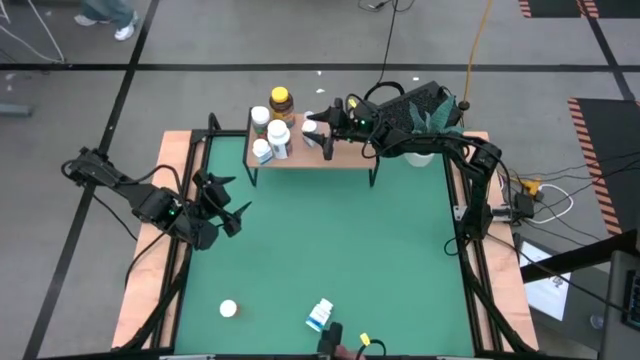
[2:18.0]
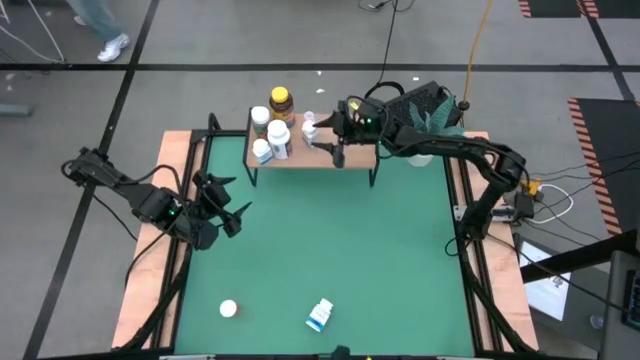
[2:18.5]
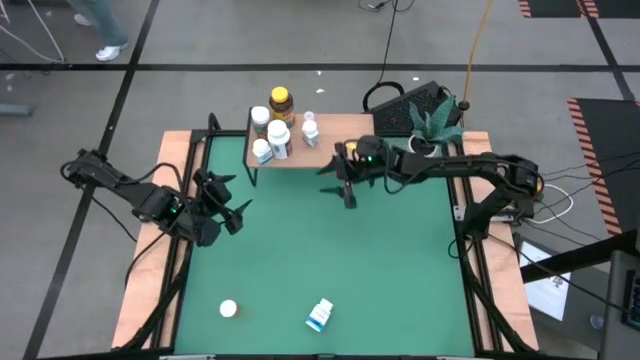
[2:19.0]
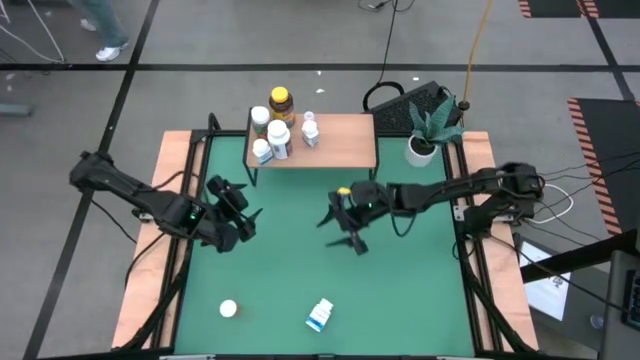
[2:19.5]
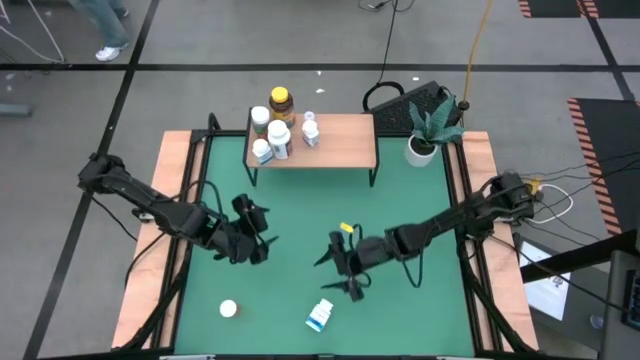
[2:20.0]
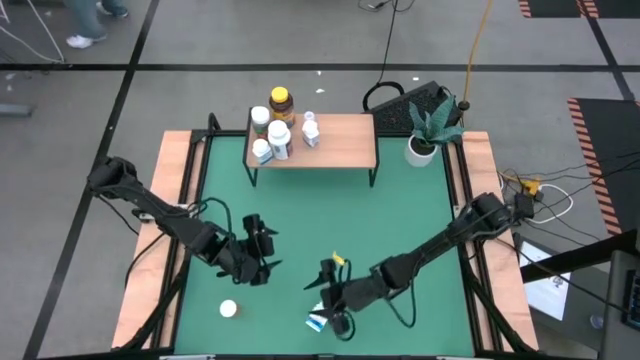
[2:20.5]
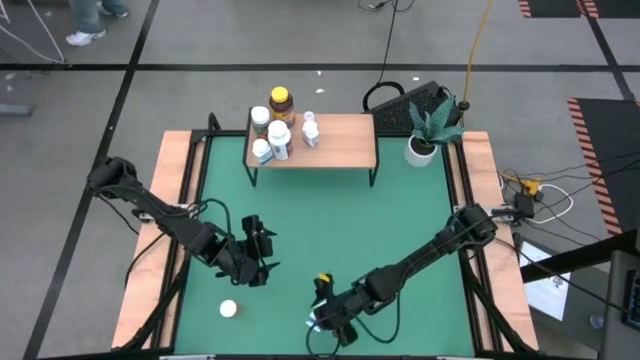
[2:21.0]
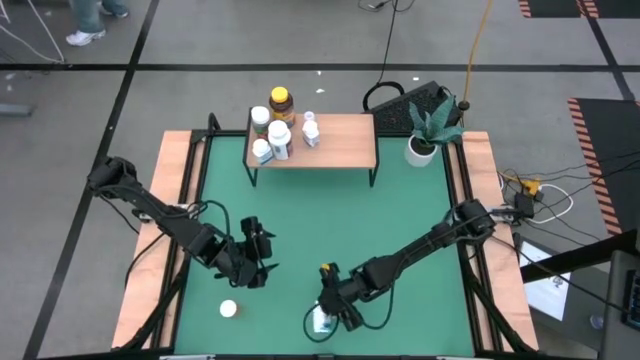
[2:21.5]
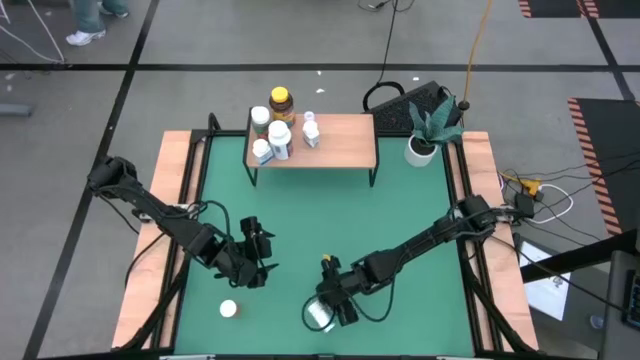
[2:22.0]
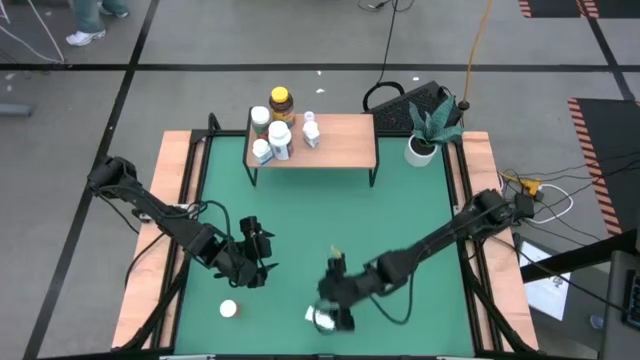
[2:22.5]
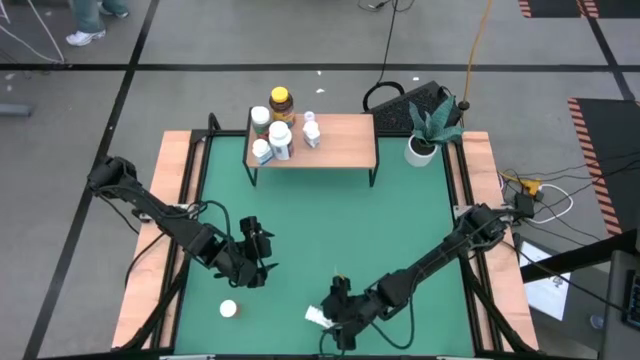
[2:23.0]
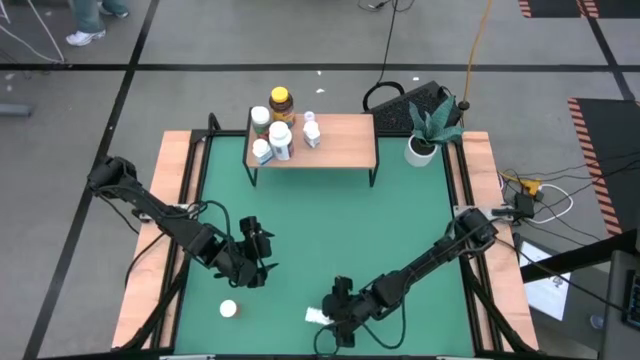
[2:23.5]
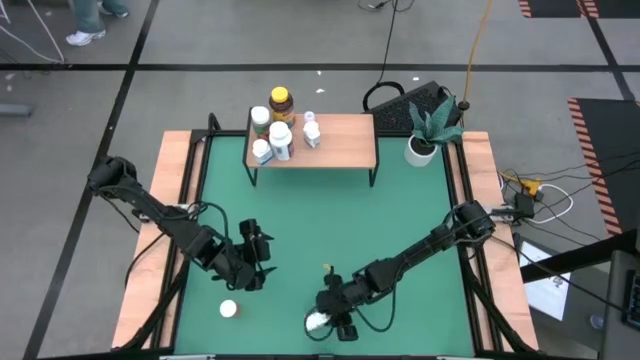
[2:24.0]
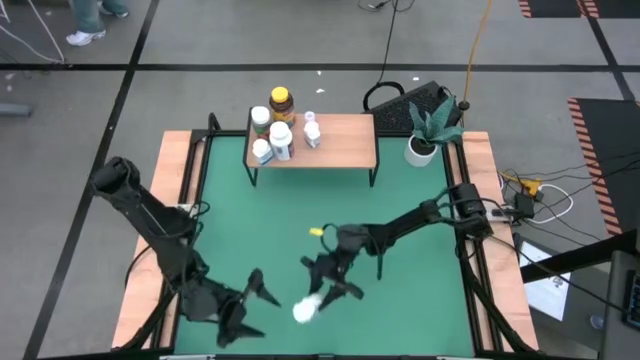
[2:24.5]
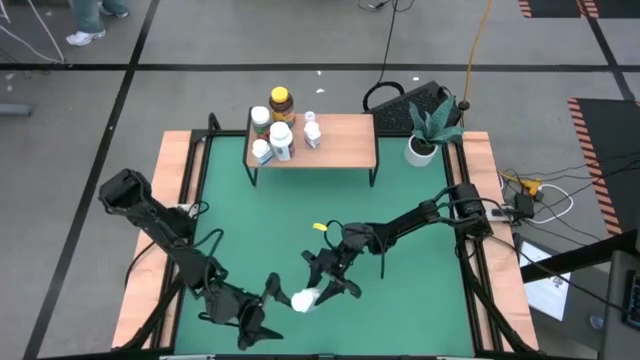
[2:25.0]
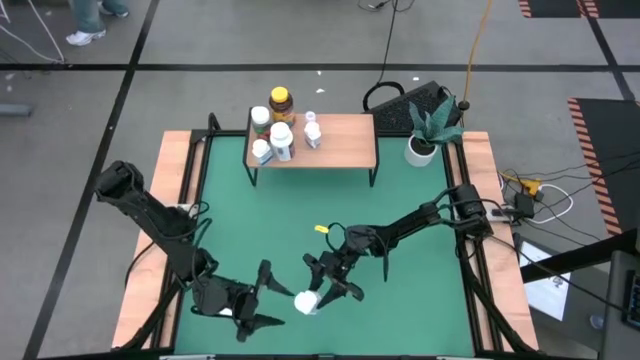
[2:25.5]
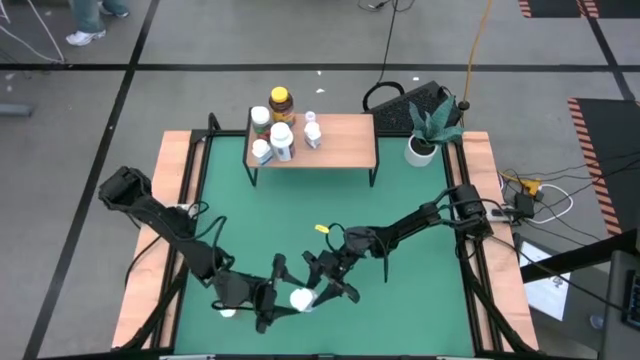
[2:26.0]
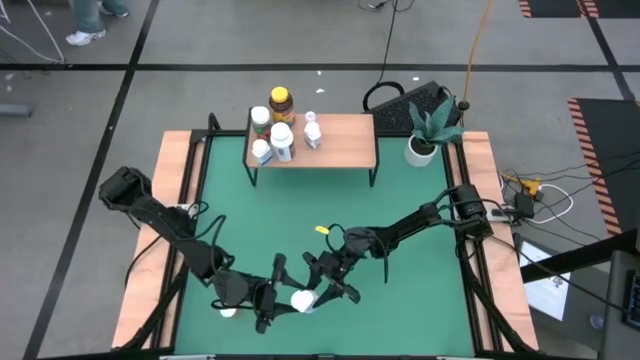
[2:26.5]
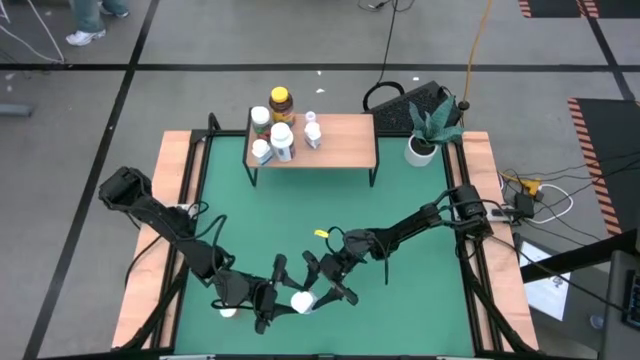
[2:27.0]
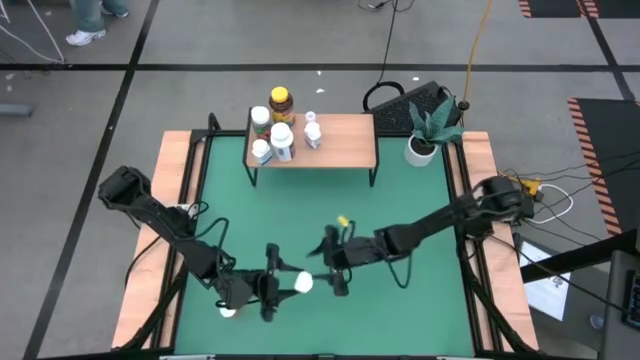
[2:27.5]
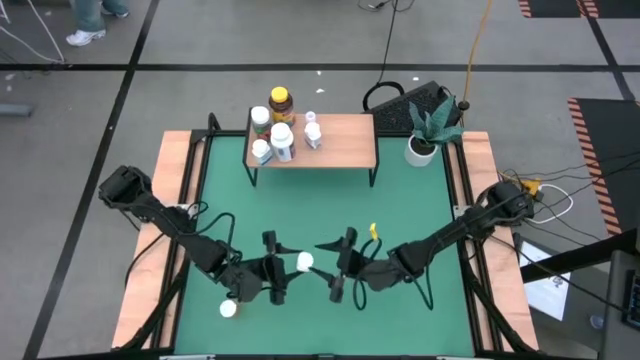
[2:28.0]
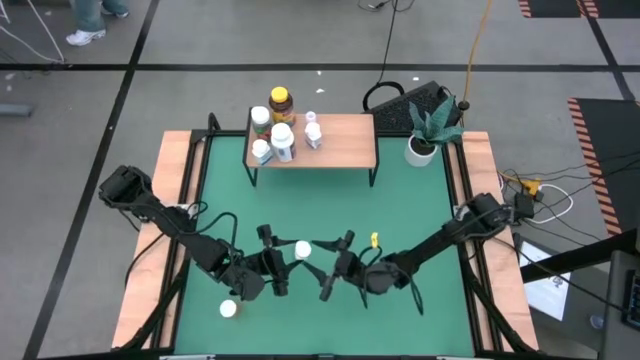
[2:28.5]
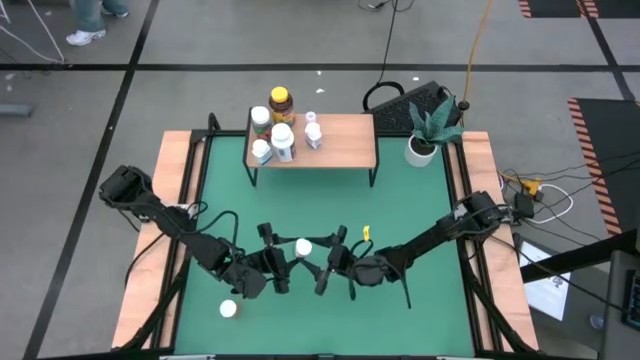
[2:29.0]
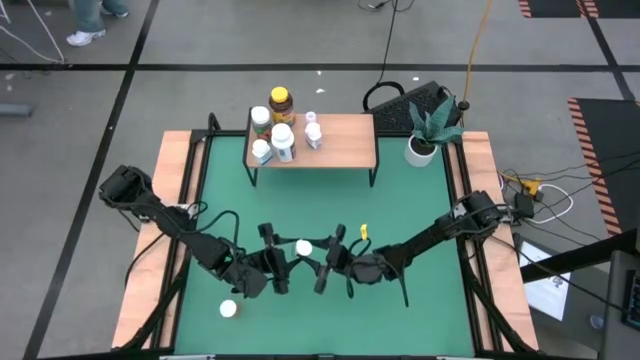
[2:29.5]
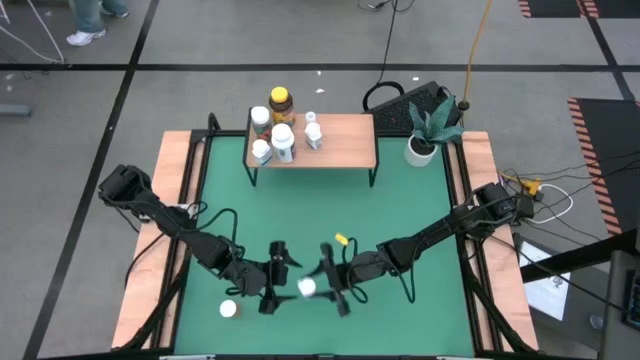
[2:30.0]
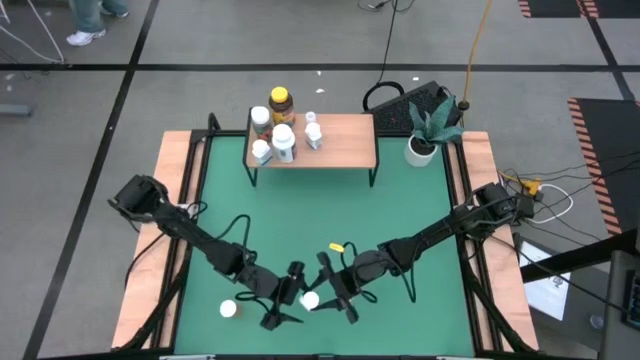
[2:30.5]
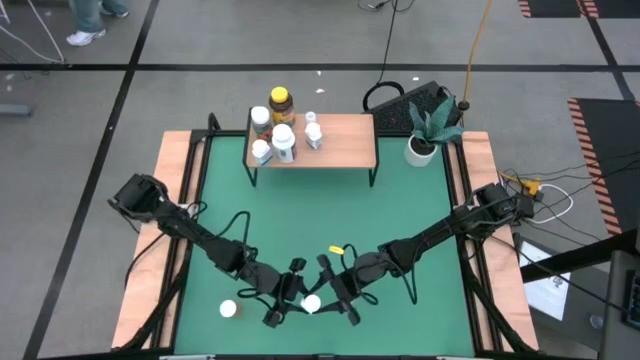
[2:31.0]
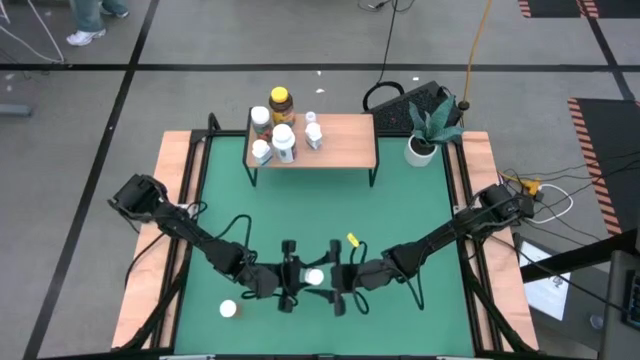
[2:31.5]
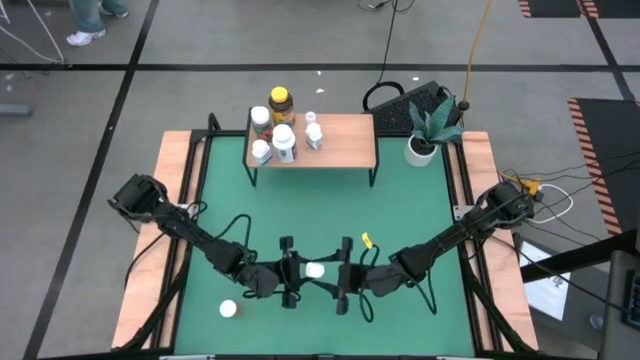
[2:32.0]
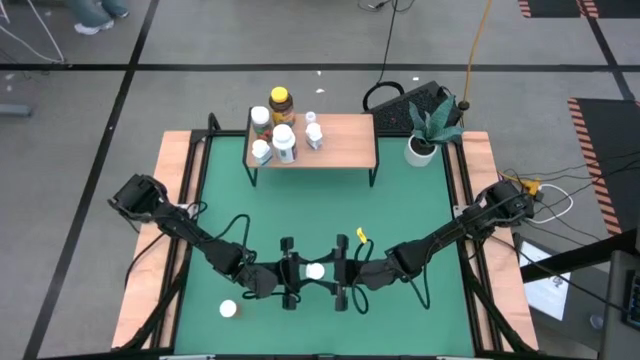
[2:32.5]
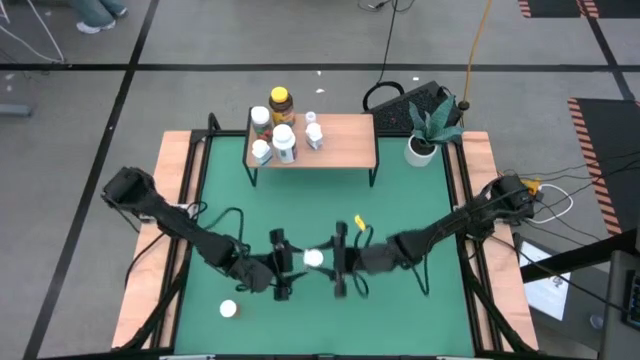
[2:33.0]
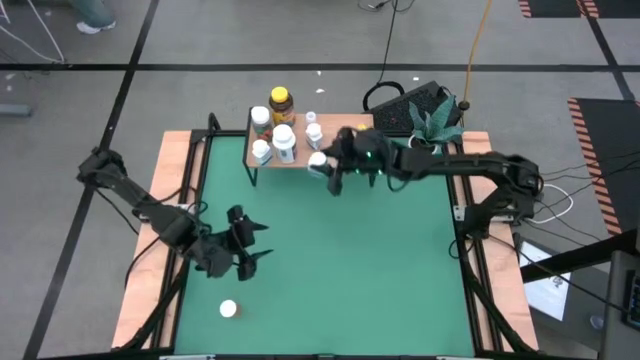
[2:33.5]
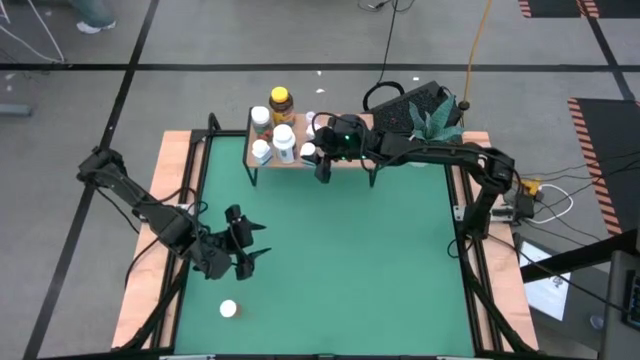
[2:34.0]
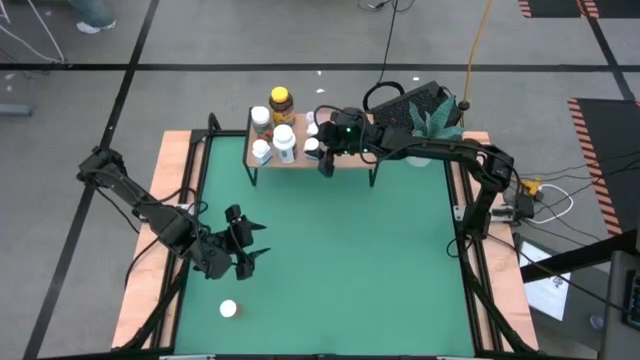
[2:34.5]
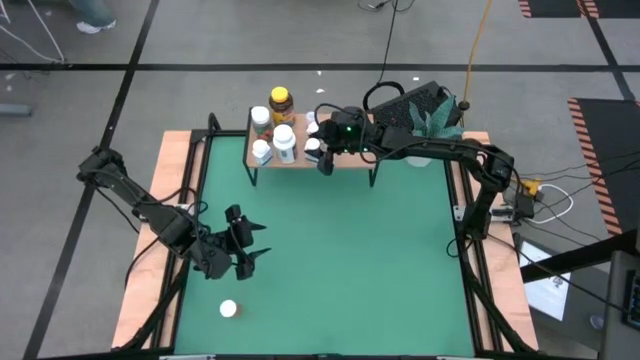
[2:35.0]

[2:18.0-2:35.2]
Task: Pick and place medicine bottles onto shelf by color
Put the white blue medicine bottle on the shelf

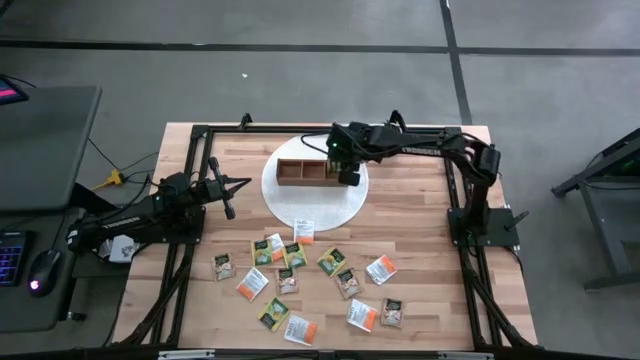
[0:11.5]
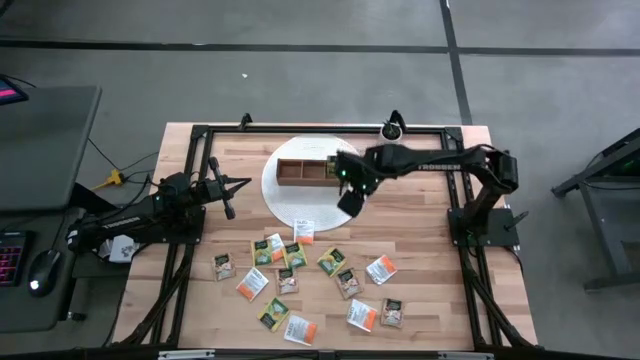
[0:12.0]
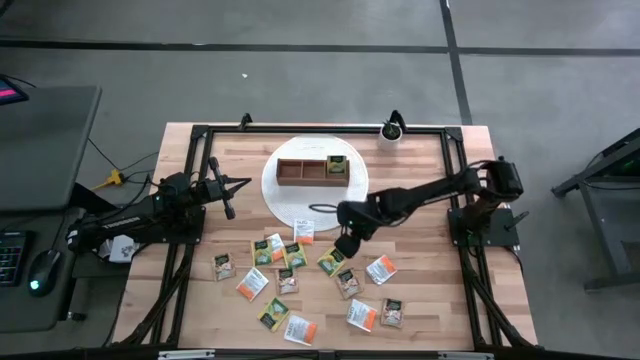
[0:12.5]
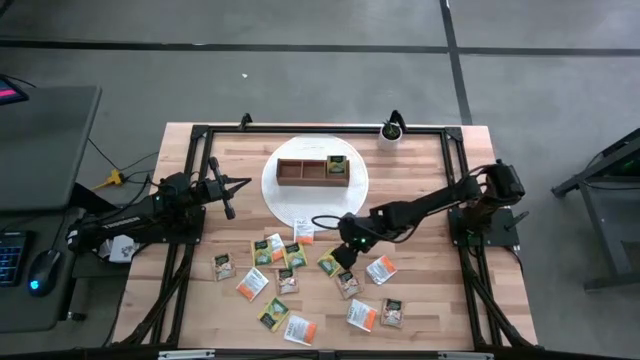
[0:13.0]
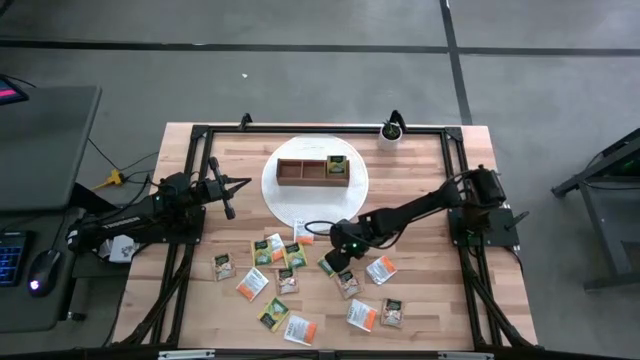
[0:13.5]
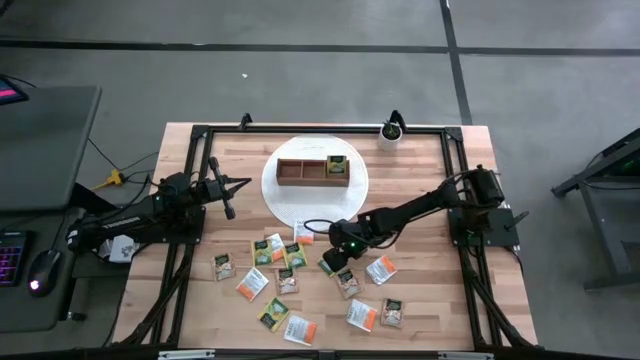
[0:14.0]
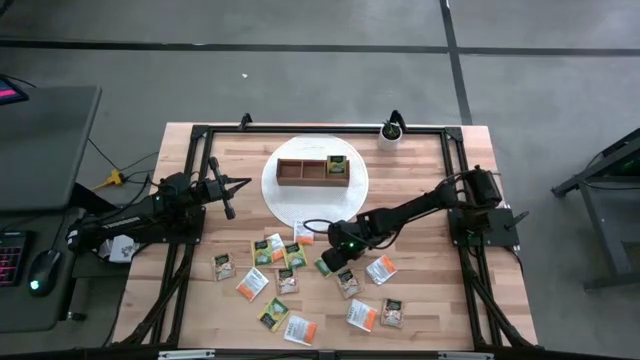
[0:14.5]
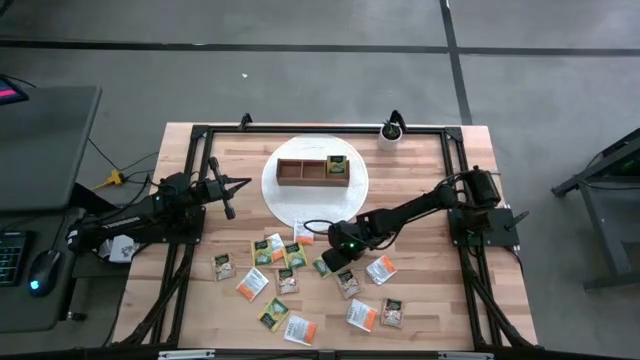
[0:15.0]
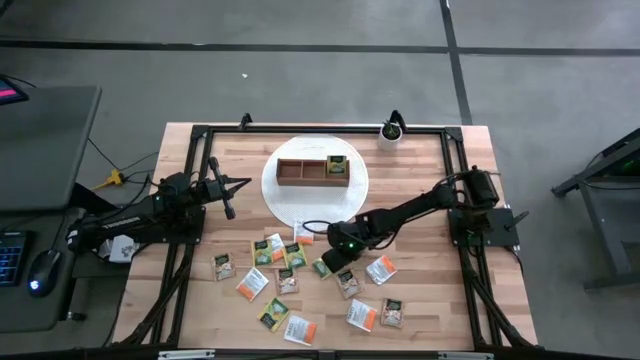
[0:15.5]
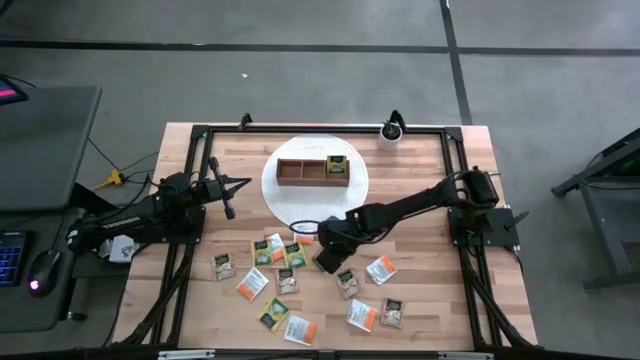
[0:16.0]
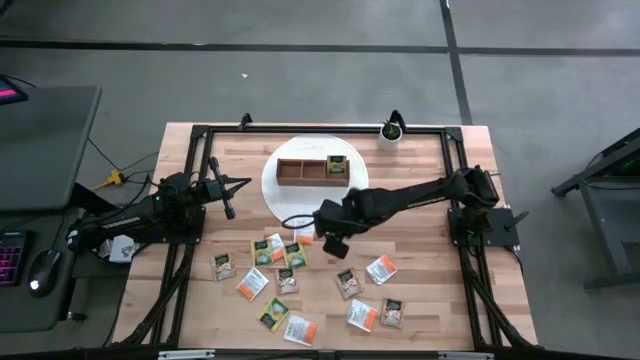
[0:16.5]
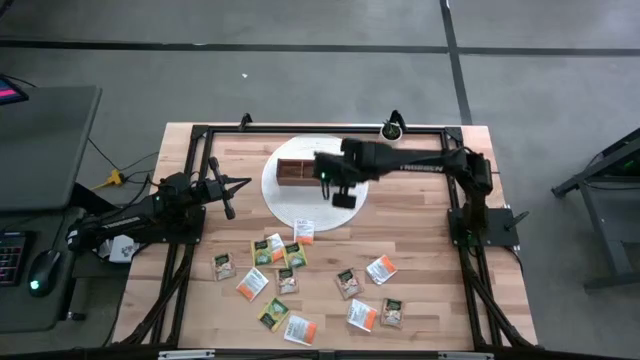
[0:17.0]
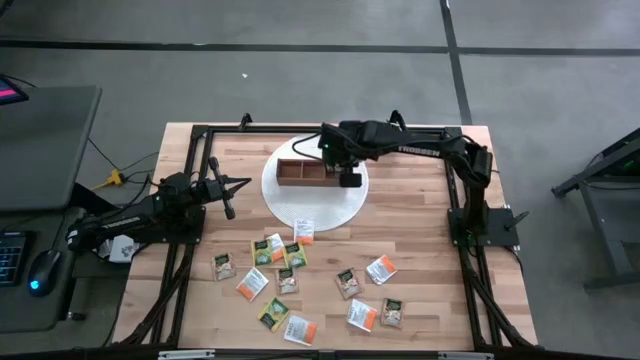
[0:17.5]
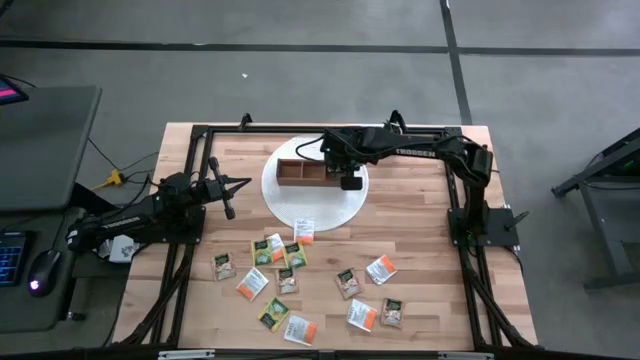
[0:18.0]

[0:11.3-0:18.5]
Task: Pick & Place Tea
Put the green tea bag into the right section of the wooden organizer
